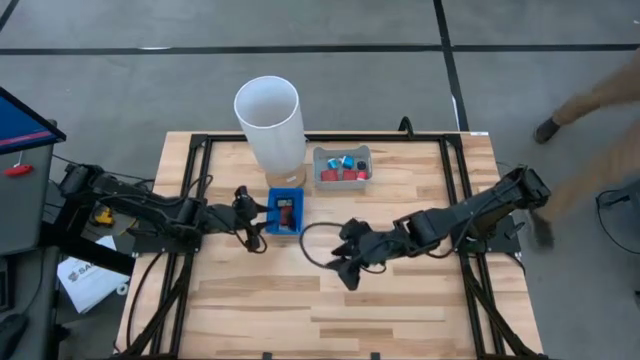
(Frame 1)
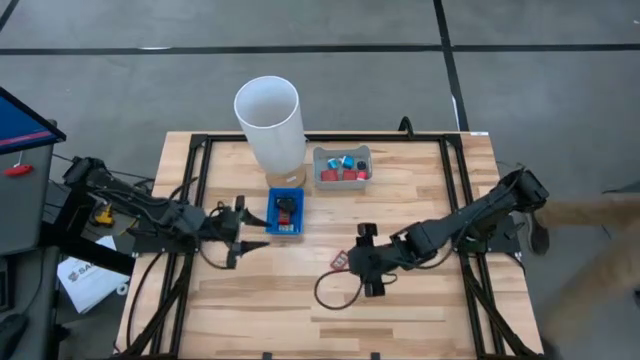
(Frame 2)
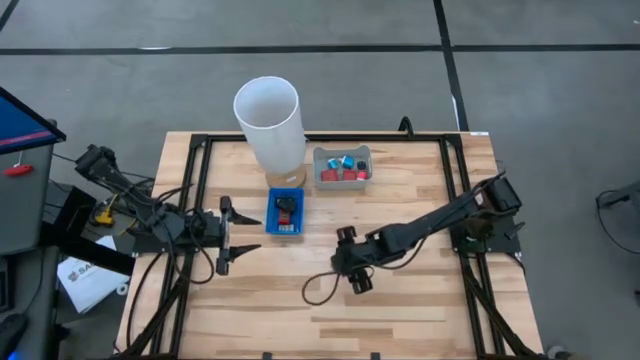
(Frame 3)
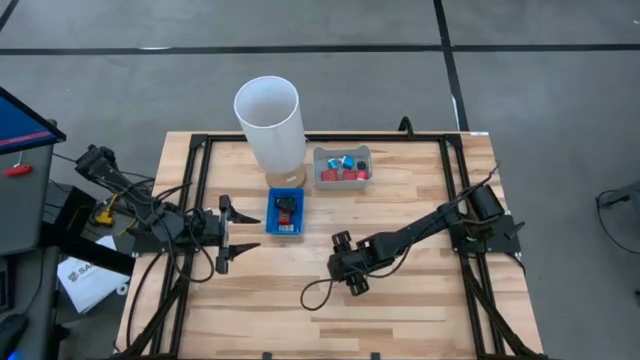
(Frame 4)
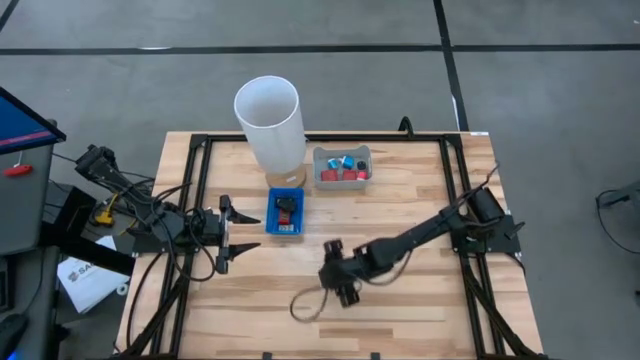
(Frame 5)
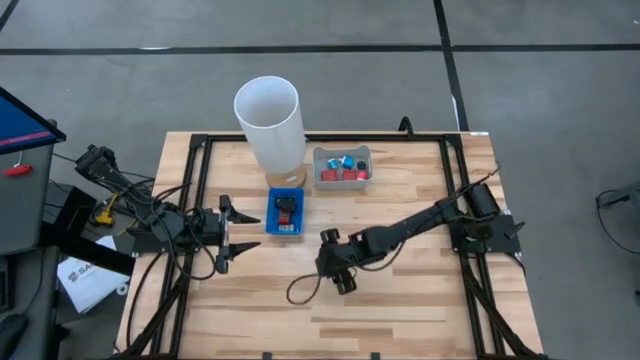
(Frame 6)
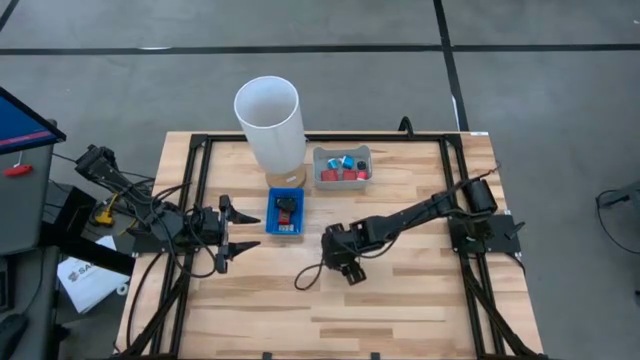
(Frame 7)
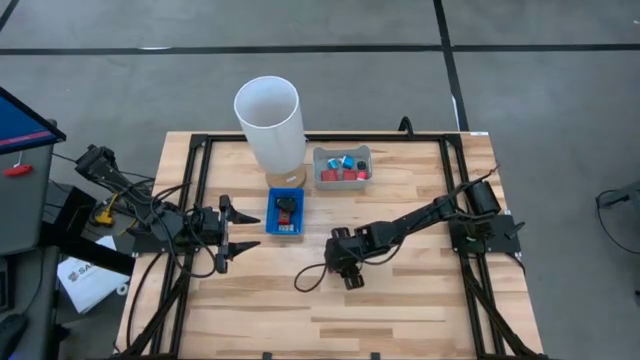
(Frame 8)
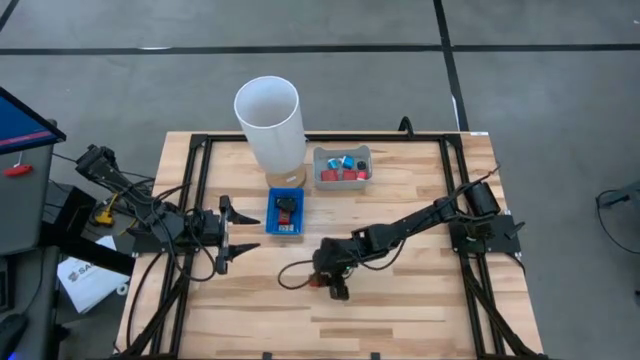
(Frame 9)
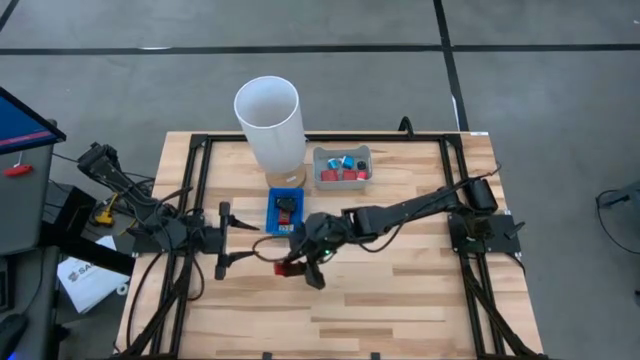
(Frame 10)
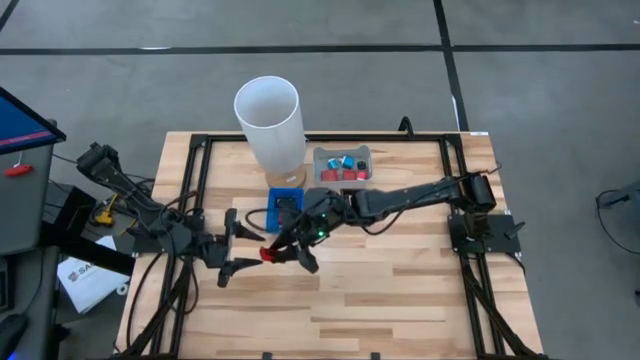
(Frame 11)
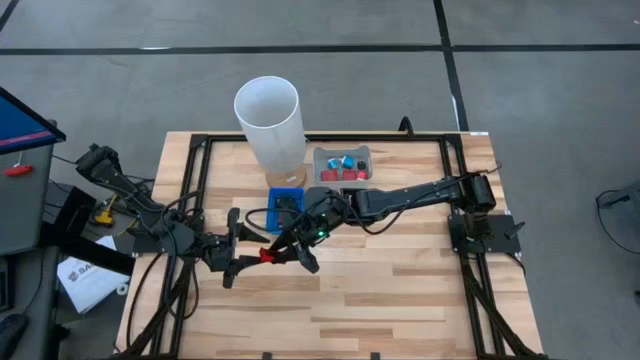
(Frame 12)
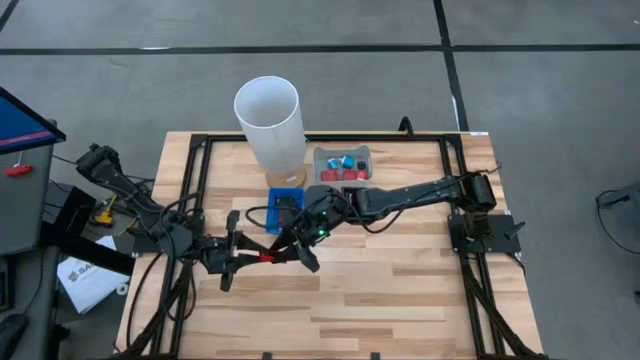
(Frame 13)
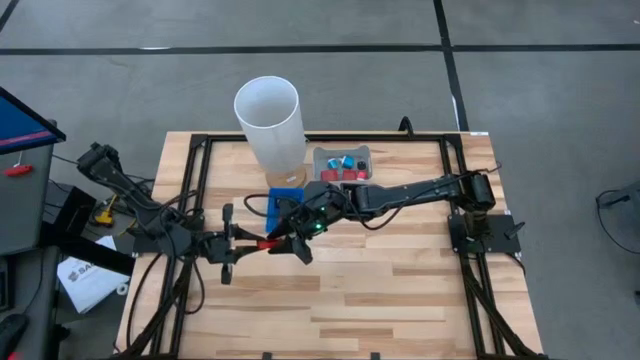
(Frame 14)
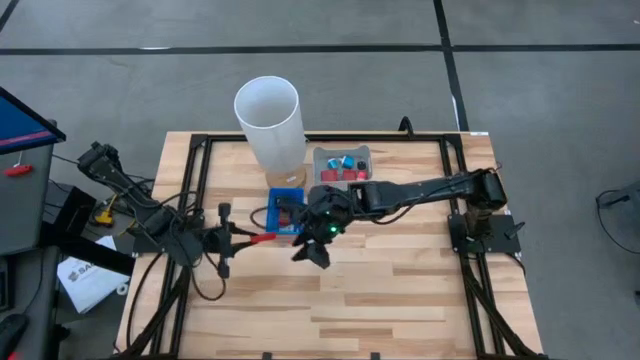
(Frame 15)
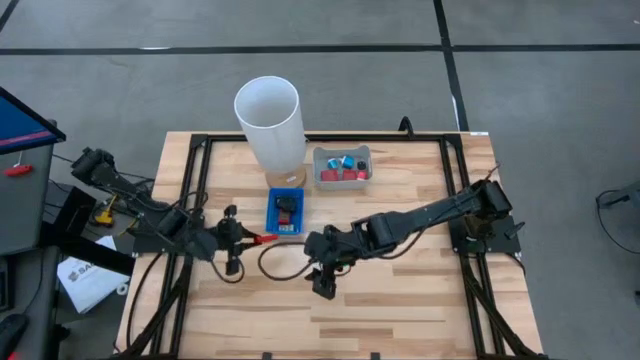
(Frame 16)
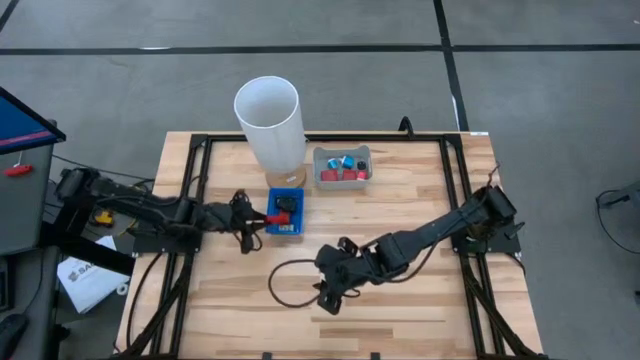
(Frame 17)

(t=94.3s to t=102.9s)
Task: Pick & Place Office items
Put the red digital clock into the blue bin

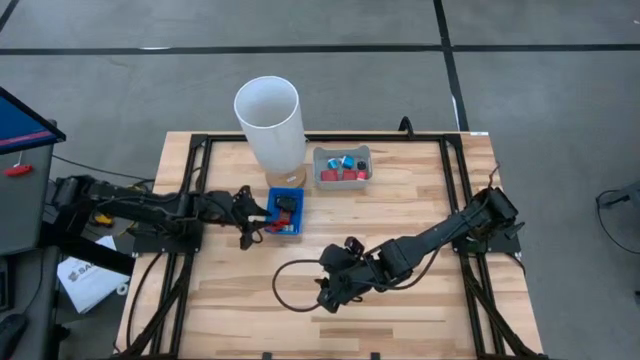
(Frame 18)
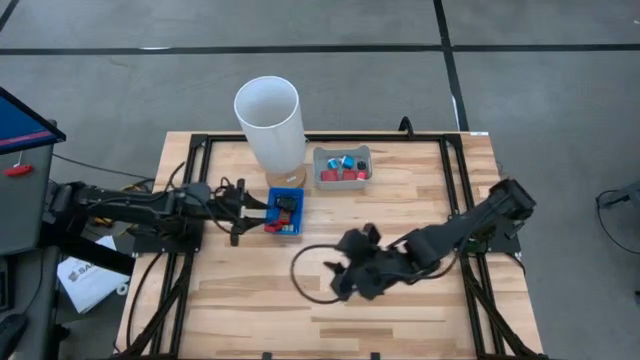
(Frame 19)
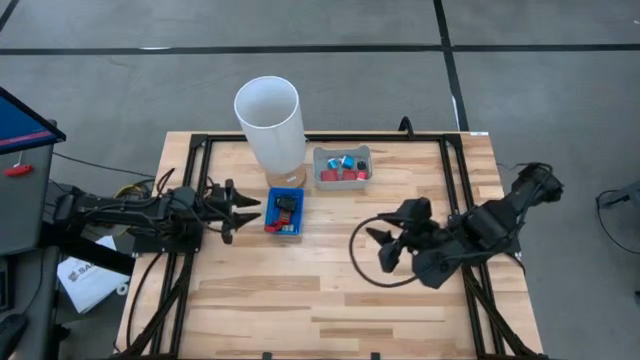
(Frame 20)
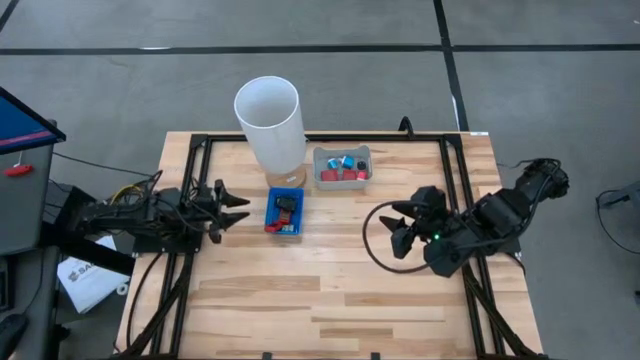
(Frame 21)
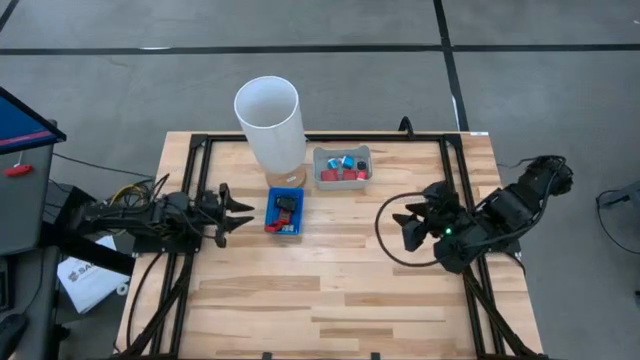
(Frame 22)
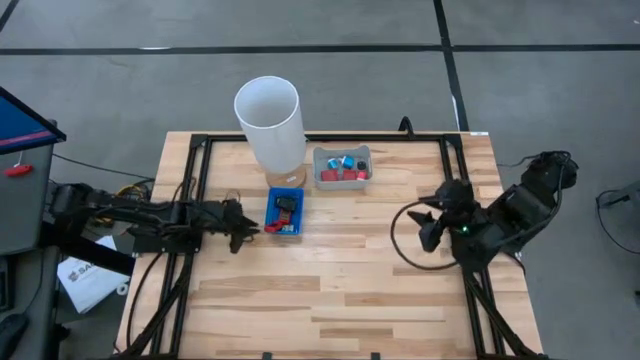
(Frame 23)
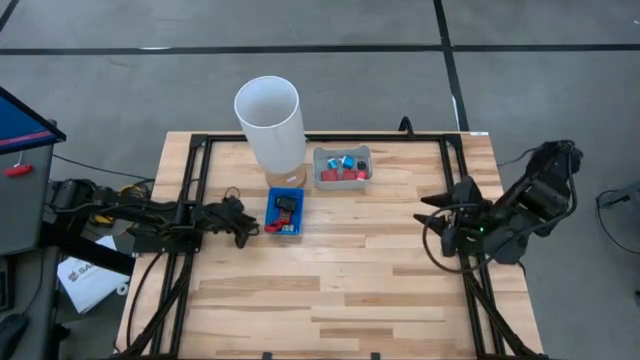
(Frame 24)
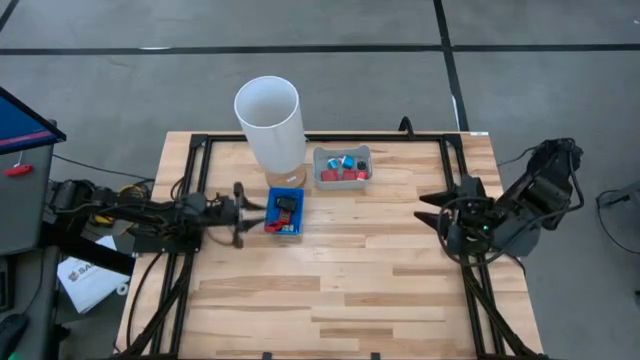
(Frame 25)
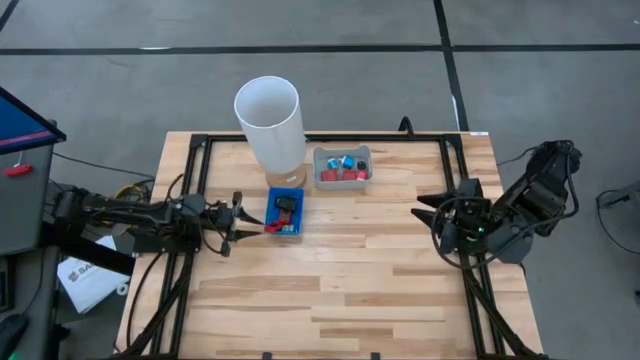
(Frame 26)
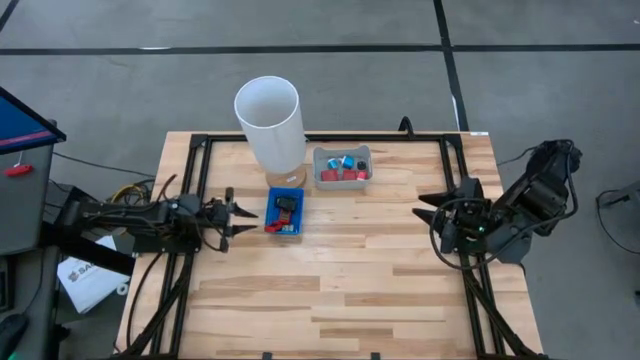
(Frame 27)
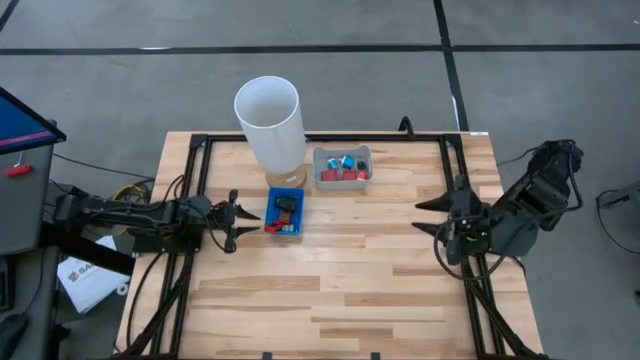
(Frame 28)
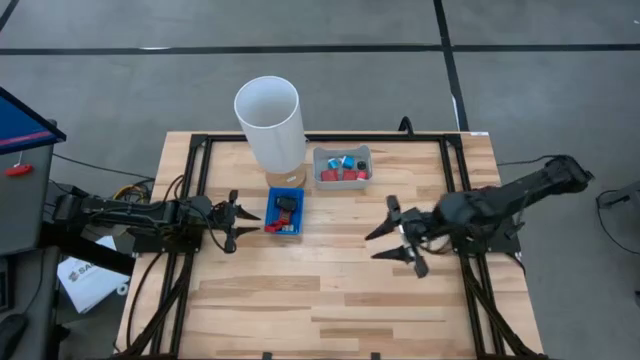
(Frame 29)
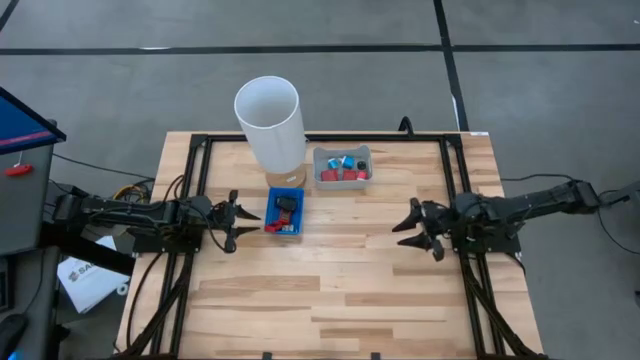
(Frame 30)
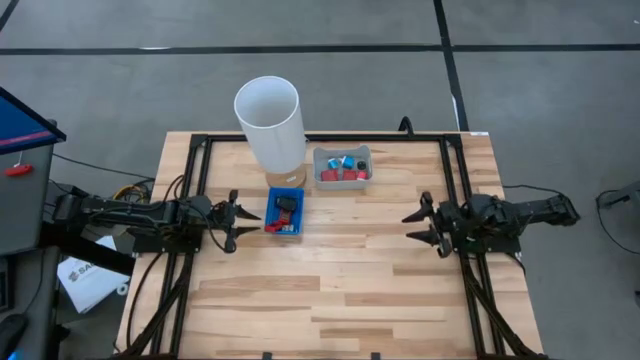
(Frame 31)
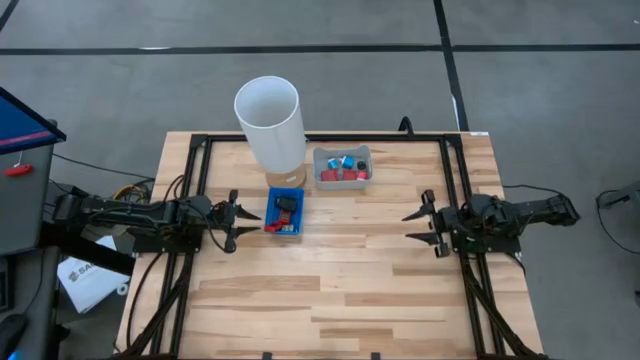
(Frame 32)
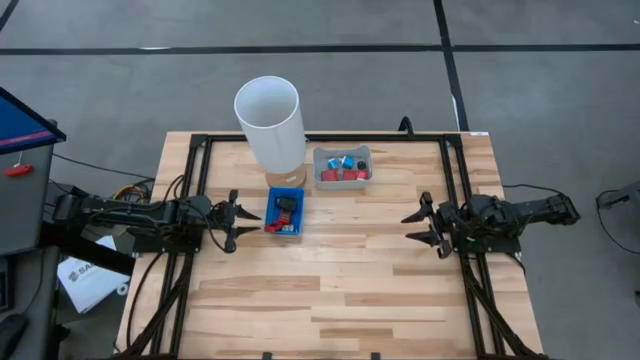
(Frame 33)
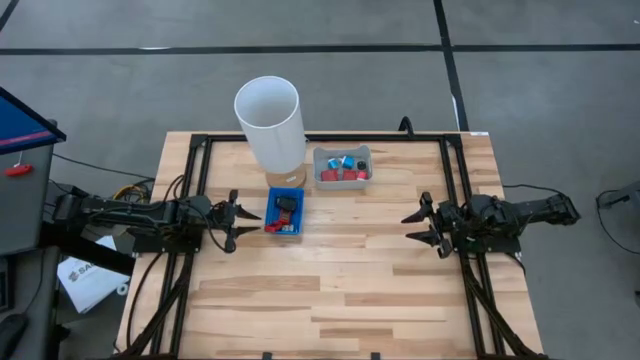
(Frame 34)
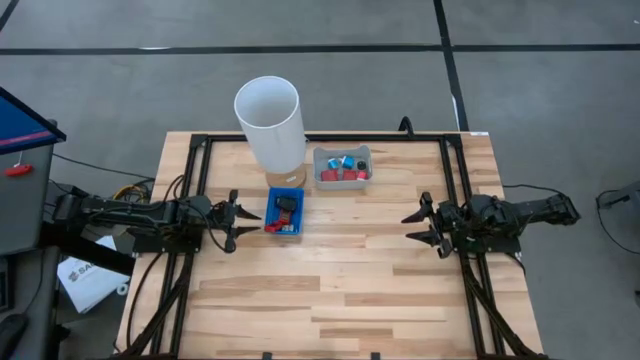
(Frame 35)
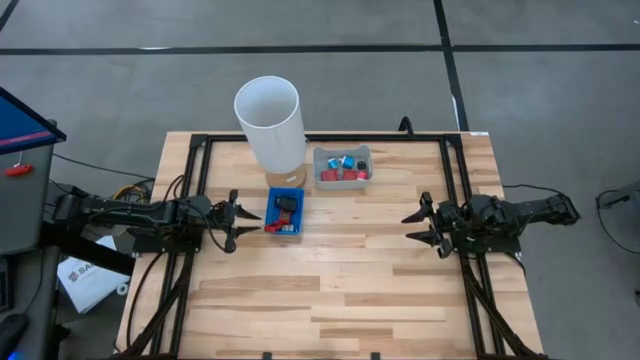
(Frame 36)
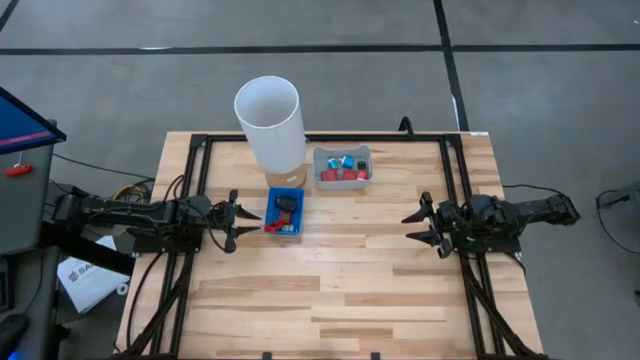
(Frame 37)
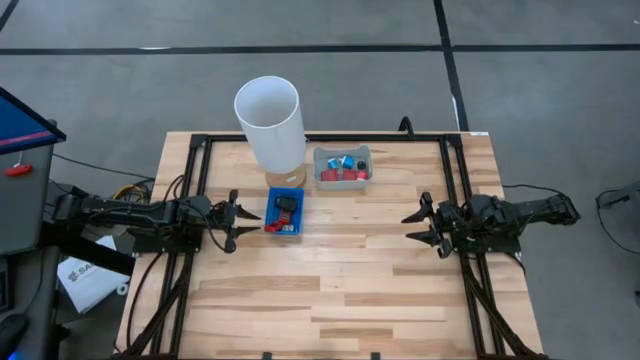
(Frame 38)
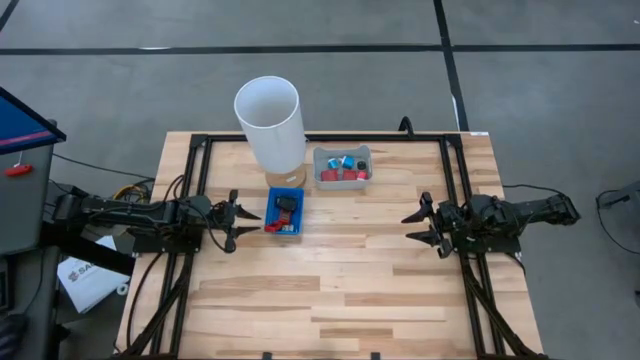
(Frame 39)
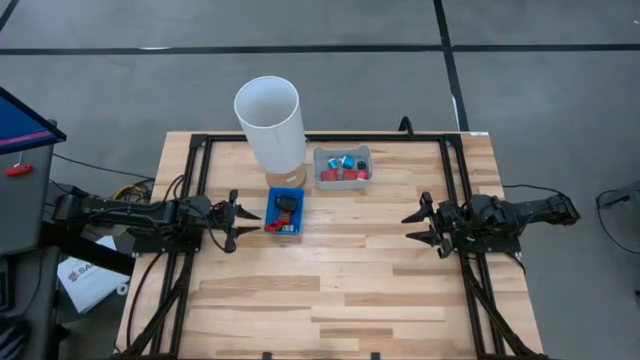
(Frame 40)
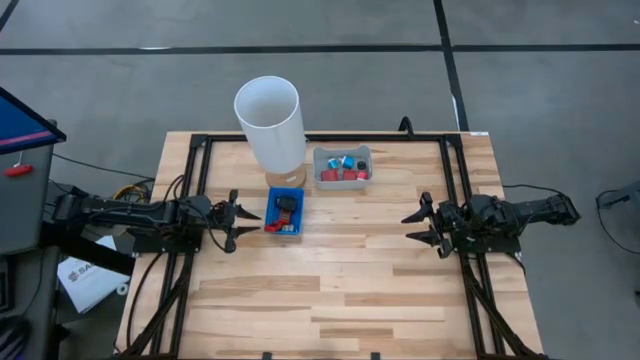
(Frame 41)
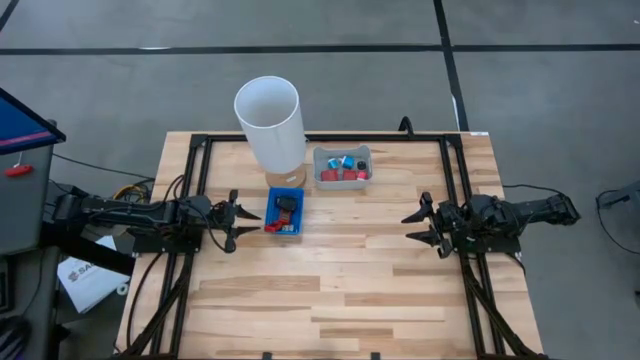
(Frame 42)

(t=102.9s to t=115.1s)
Return to Home Position
